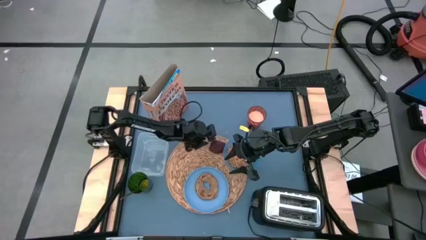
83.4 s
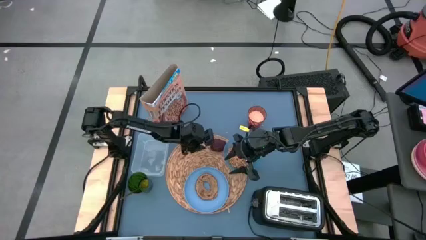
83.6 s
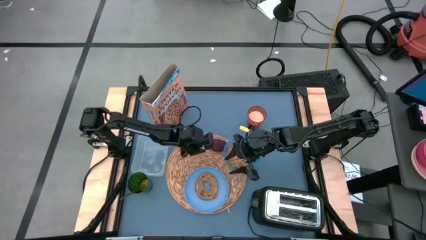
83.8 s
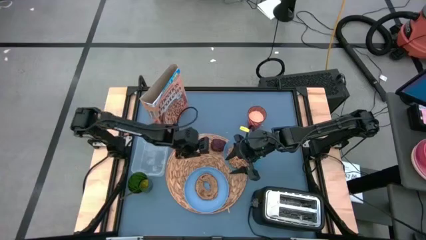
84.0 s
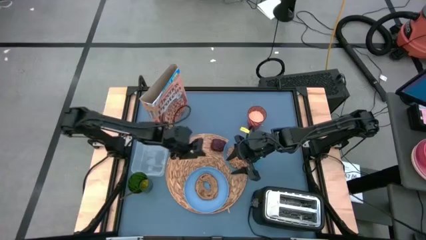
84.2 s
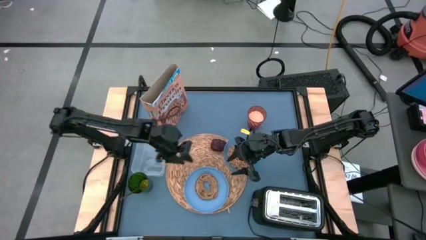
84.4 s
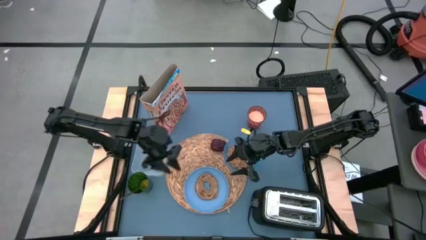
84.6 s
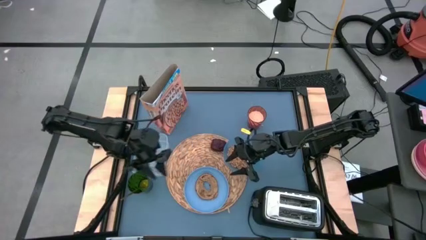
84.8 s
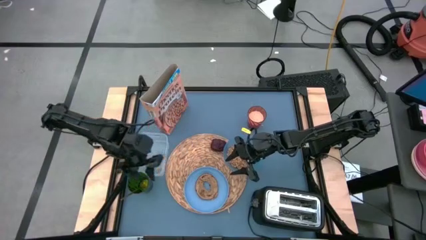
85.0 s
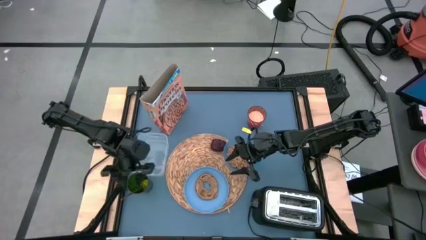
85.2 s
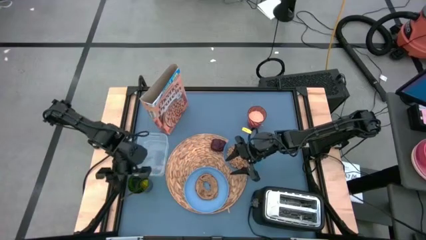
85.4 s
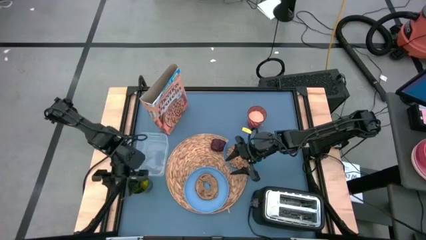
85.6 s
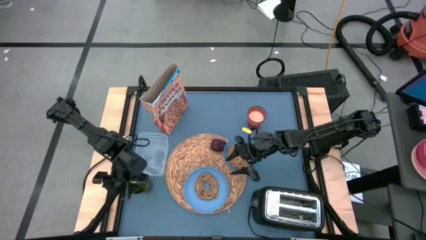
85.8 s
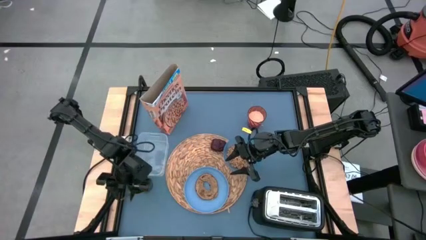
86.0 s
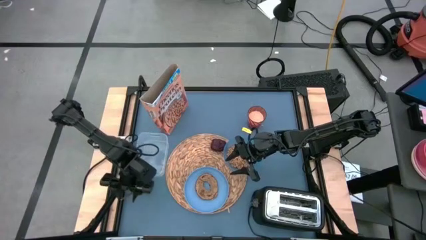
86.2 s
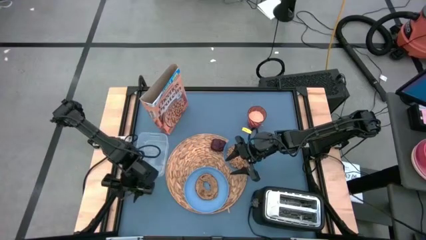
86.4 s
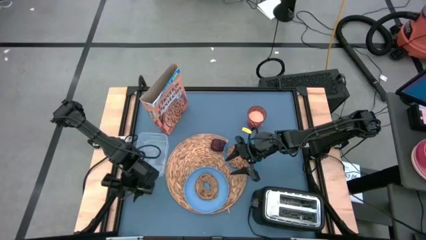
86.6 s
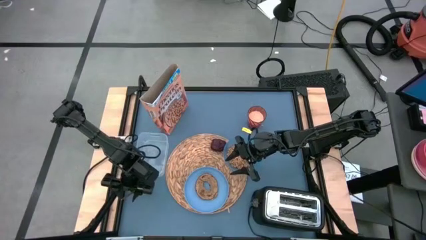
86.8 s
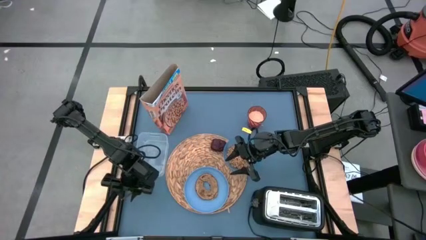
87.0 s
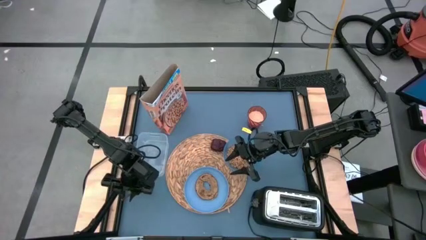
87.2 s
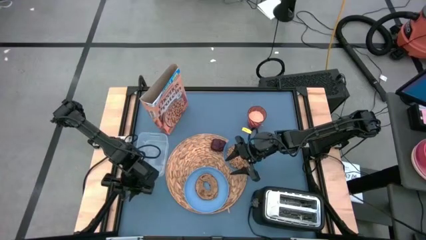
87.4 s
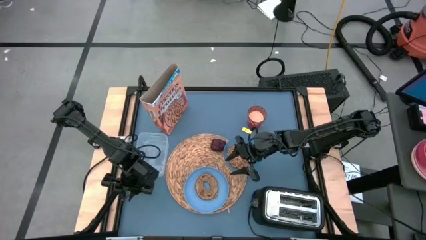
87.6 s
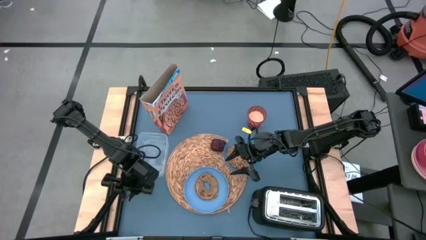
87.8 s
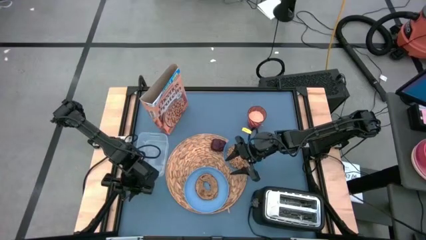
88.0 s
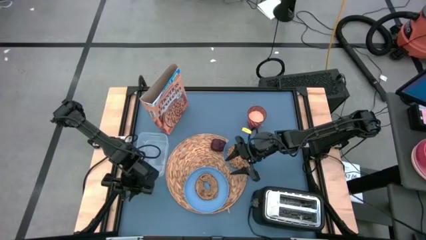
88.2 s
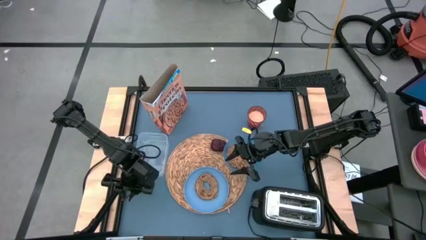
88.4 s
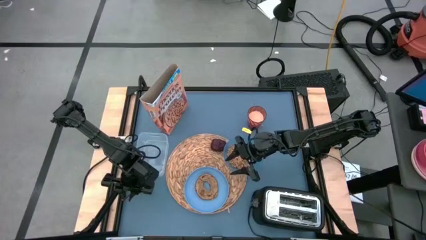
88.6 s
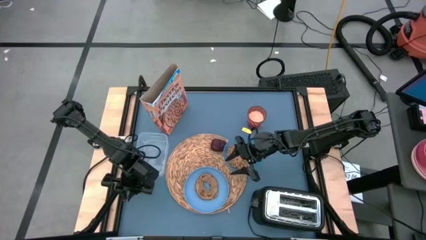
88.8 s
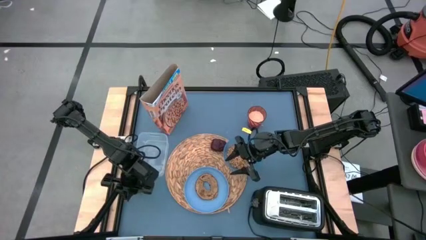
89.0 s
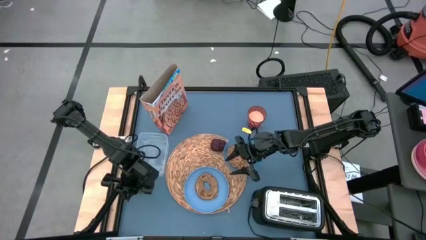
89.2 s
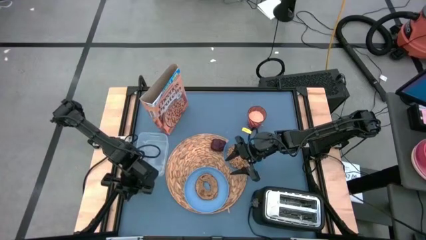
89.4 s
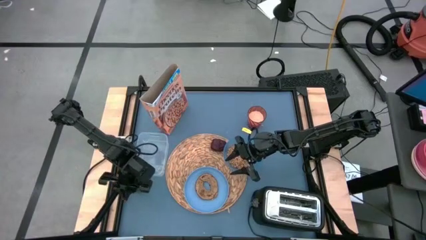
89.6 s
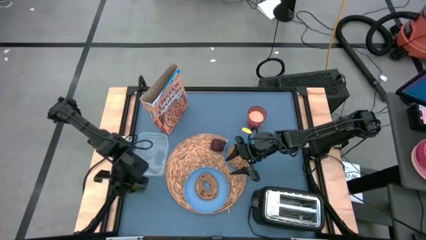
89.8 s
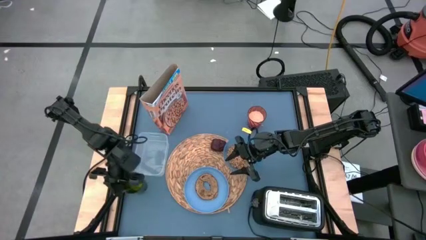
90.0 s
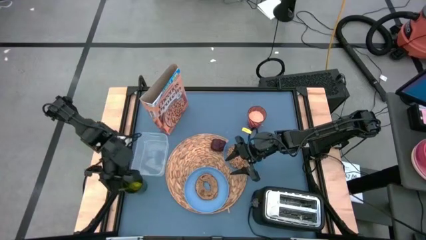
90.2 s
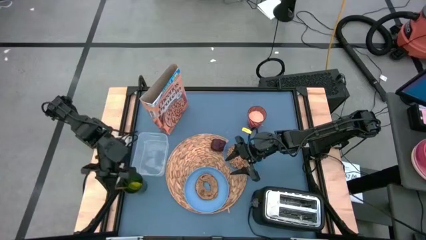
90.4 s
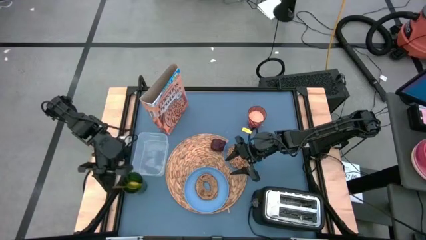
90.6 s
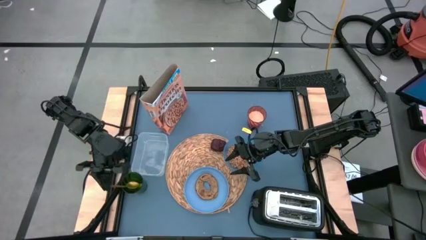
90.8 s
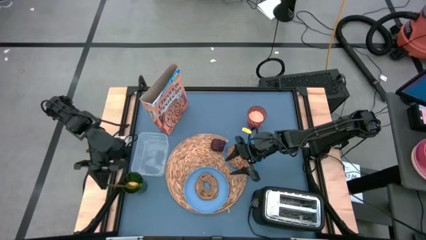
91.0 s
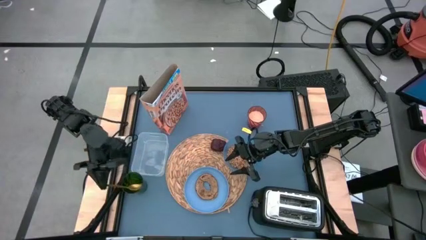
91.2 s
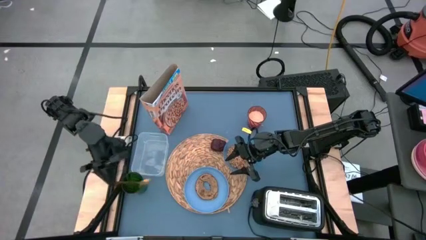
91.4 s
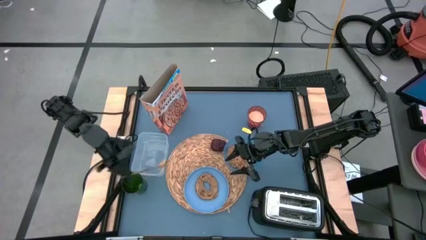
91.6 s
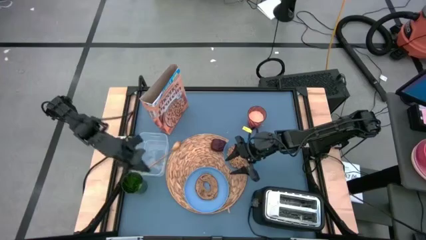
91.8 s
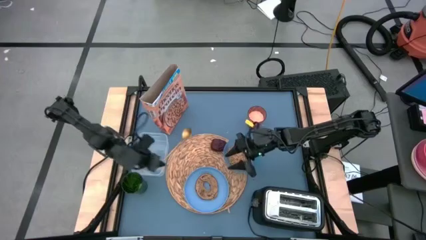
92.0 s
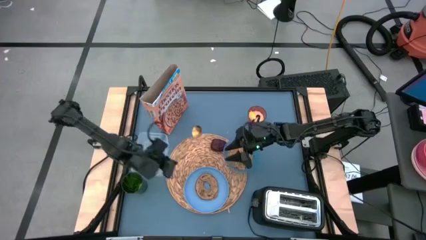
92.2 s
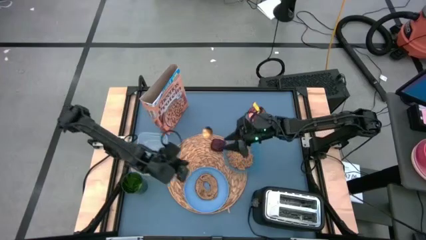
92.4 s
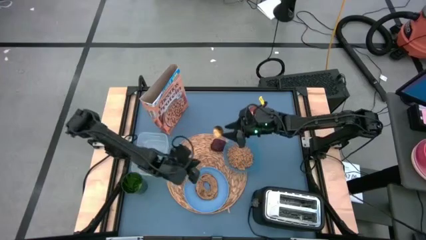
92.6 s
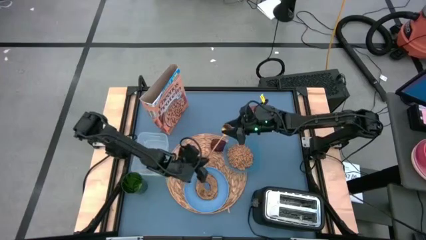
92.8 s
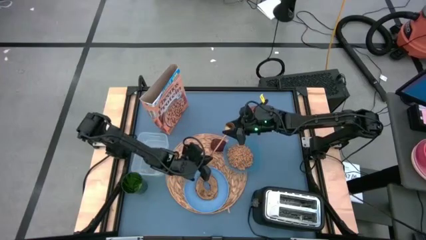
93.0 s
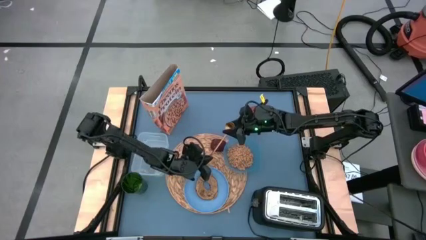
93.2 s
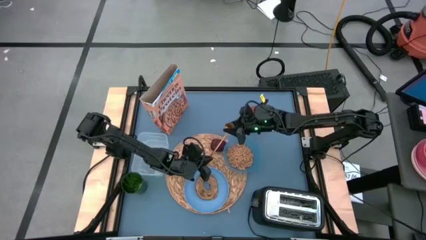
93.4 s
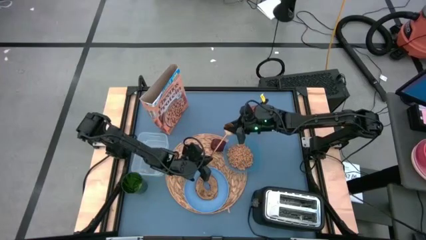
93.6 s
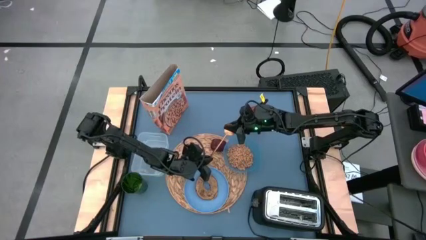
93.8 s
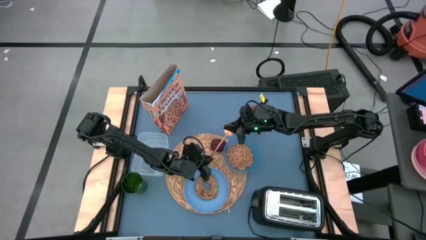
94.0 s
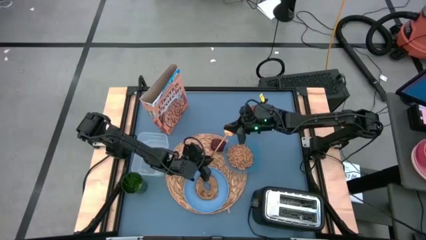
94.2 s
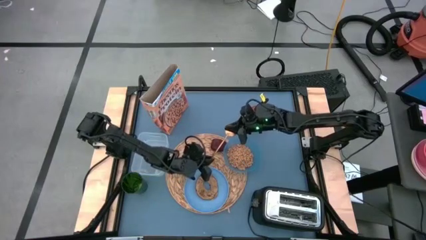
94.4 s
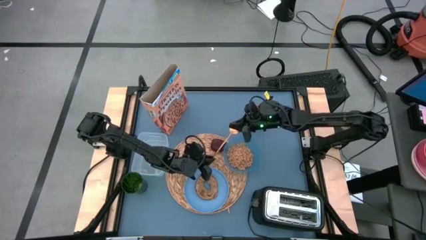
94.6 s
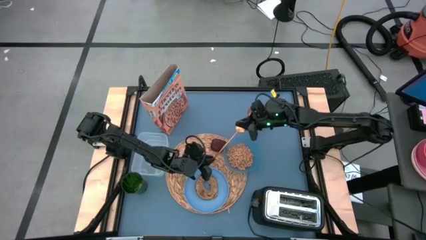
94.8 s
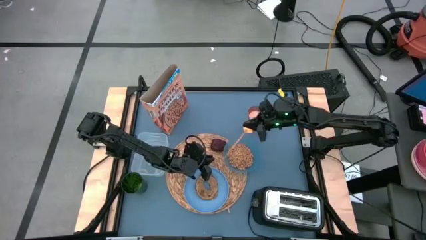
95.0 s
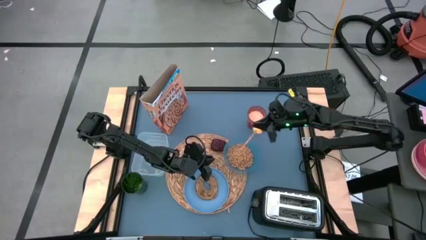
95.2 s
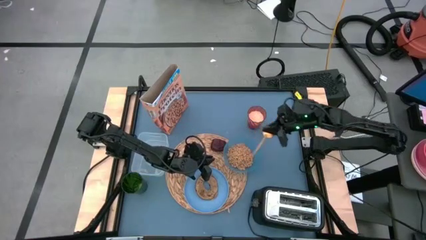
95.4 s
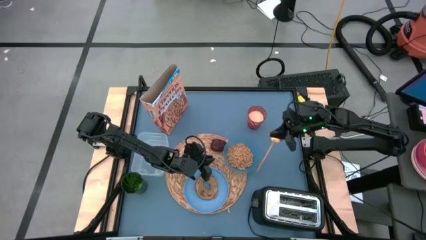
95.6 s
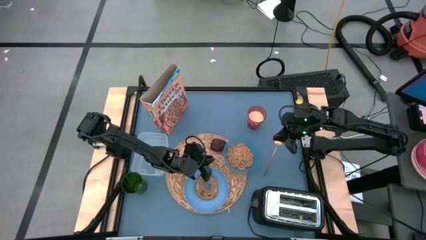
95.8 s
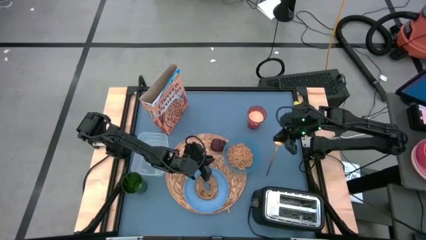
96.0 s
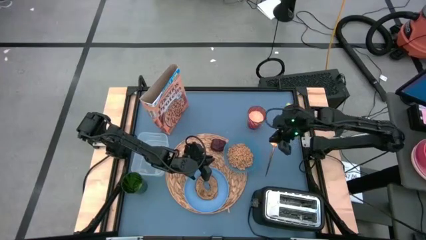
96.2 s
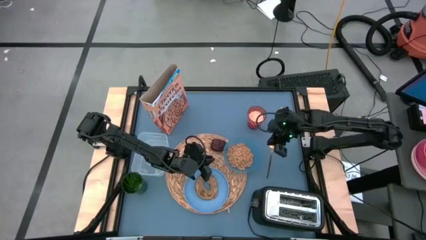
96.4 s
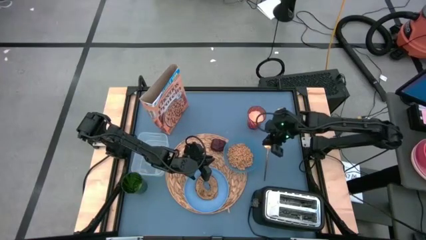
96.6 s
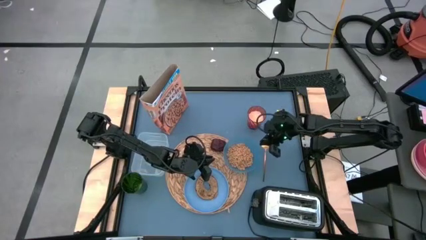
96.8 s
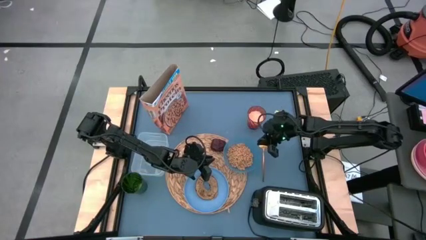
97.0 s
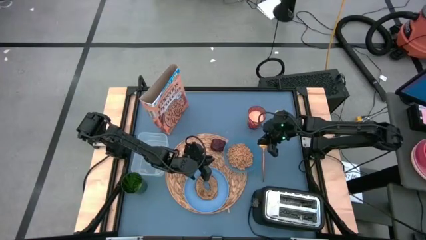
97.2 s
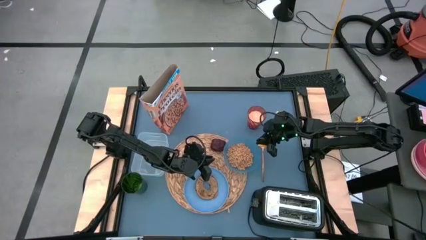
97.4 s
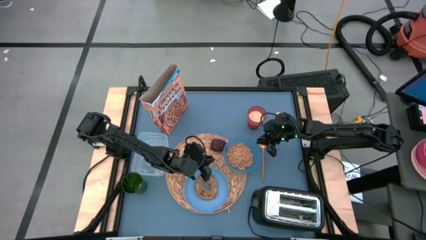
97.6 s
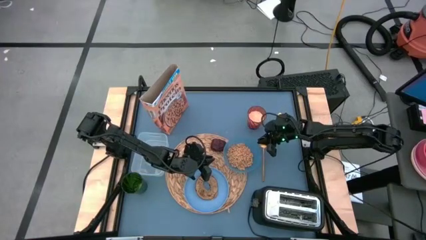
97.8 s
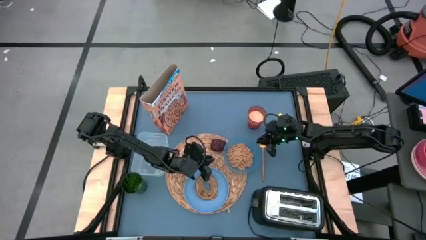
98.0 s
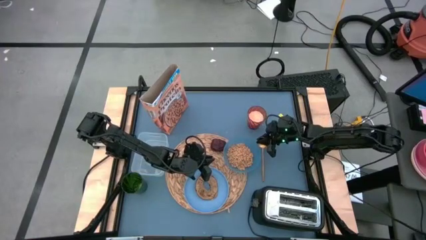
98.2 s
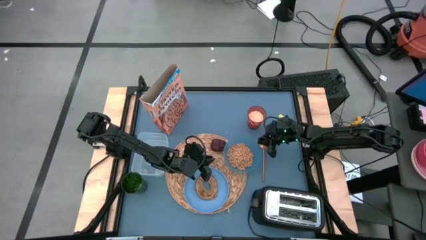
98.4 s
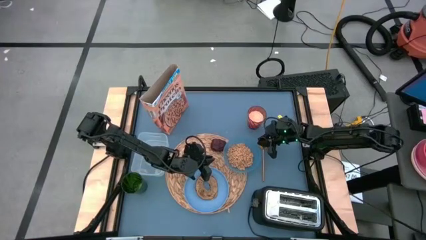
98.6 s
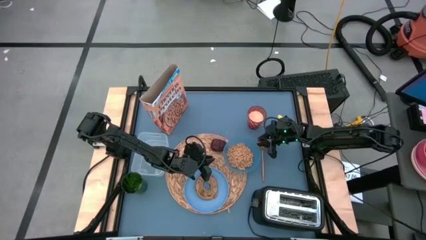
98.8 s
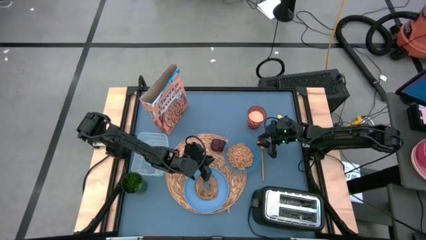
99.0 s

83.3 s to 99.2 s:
Task: Arrange a breakfast setting
Put the gold spoon on the table to the right of the blue bowl

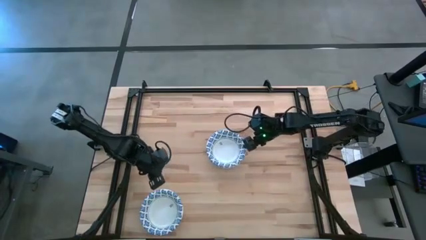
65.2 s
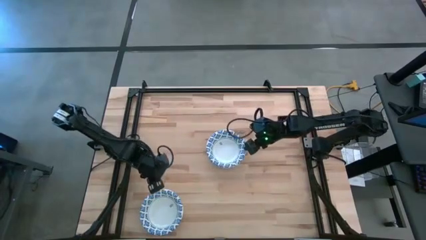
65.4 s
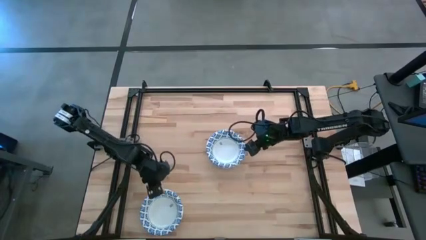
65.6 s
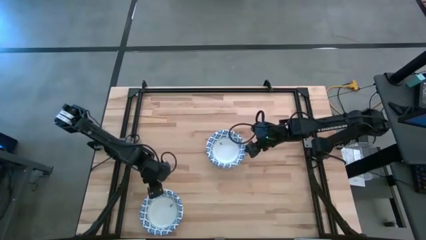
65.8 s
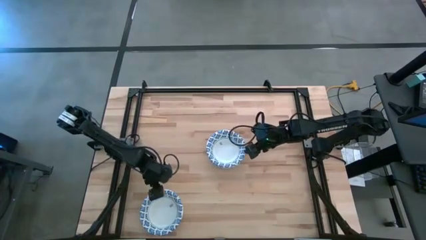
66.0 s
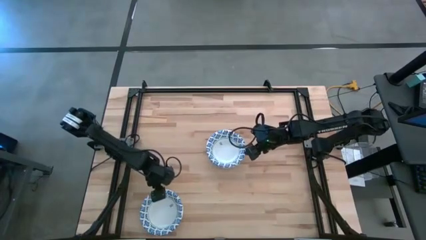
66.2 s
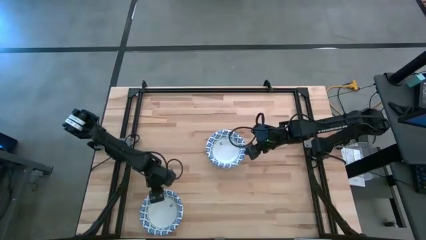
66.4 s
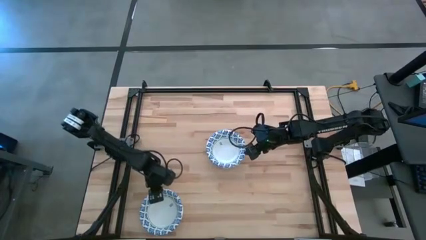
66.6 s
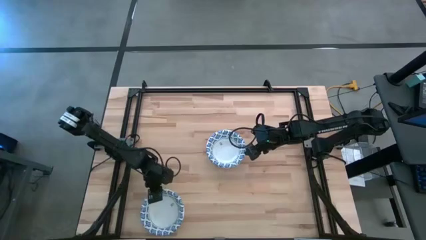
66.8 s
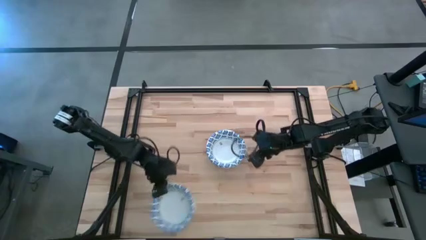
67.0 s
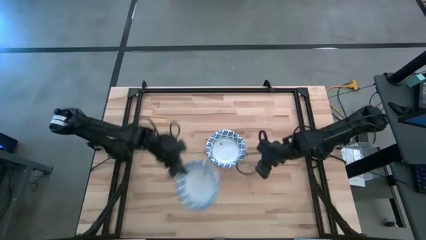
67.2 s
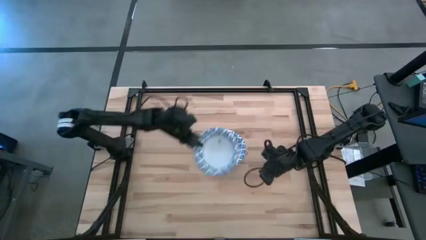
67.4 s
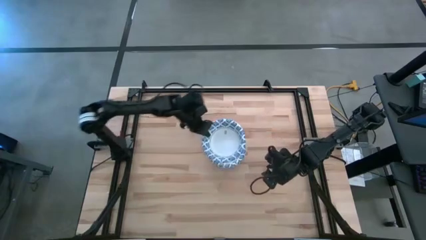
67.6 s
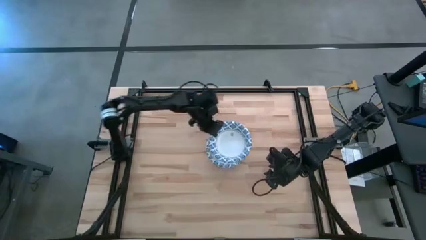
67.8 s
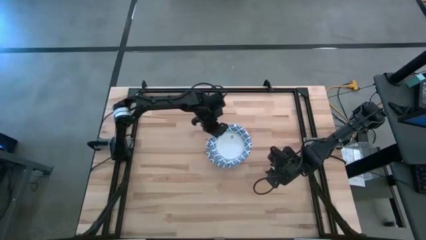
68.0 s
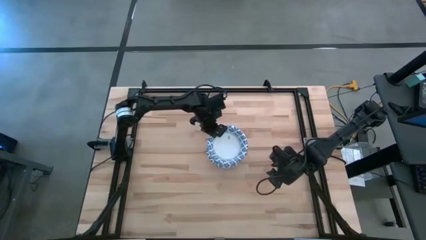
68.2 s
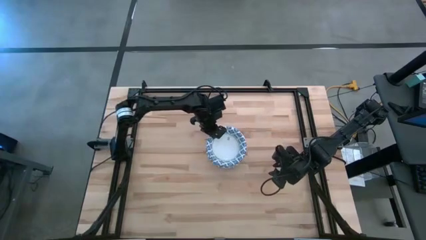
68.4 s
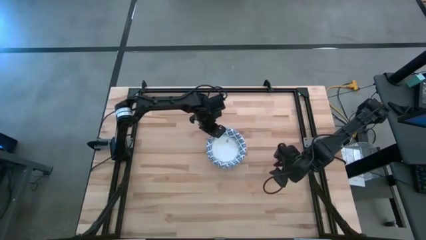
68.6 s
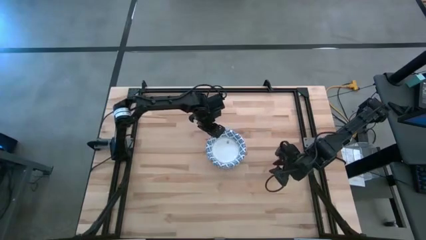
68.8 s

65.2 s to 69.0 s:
Task: Nest bowls inside each other
Stack the white patterned bowl on top of the center white patterned bowl
